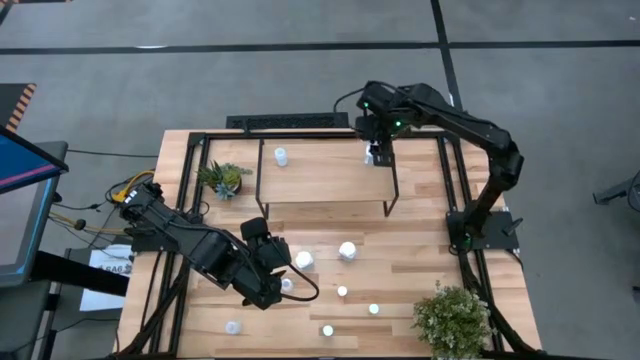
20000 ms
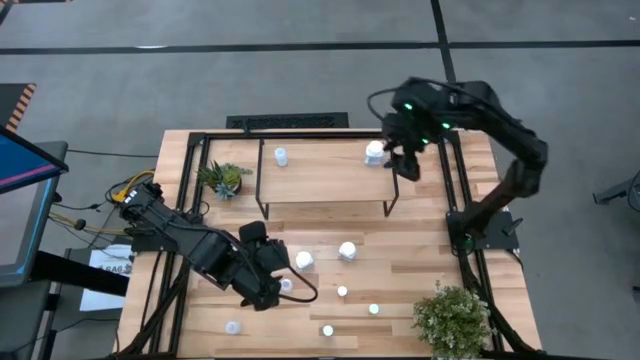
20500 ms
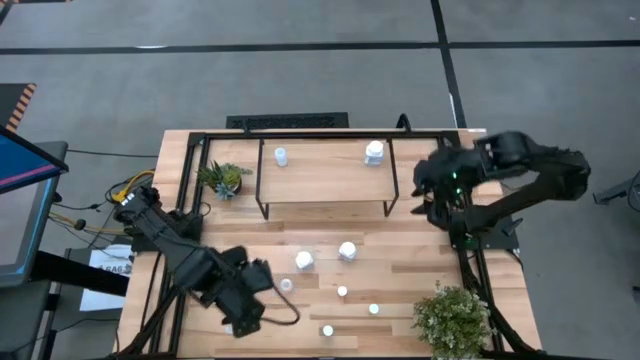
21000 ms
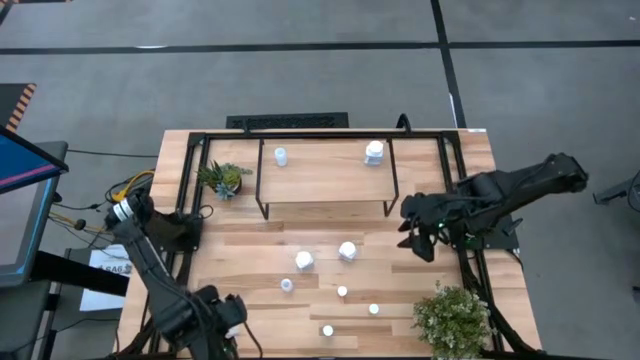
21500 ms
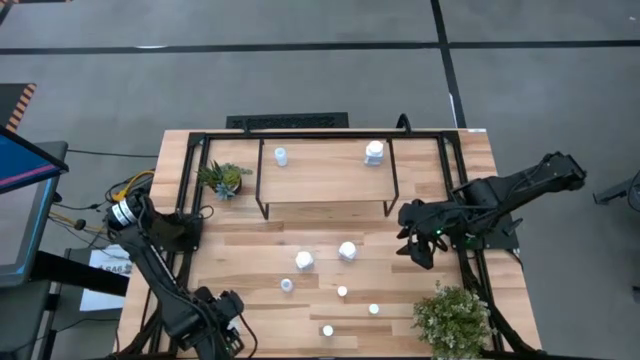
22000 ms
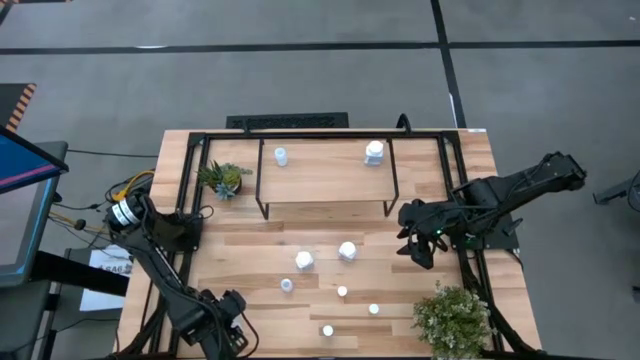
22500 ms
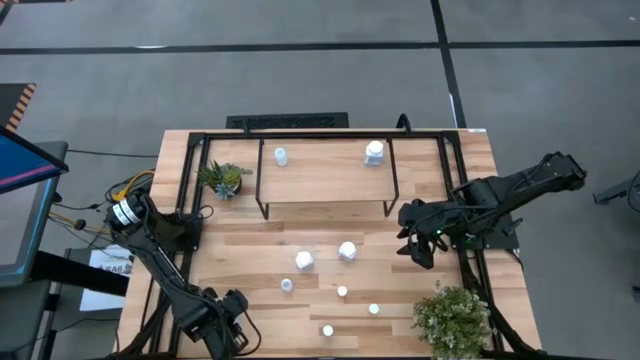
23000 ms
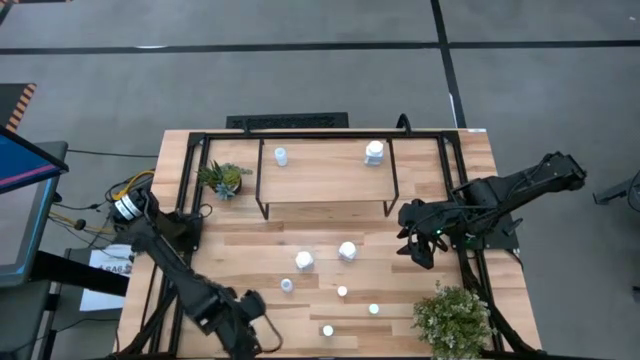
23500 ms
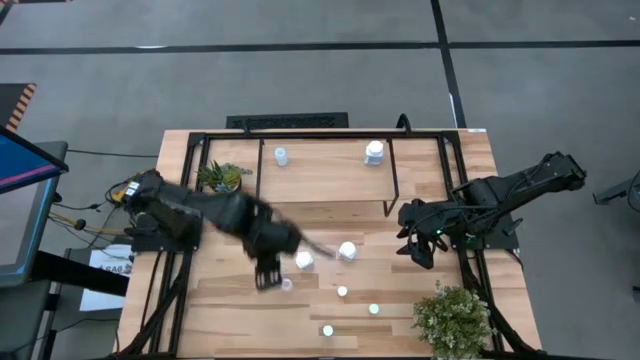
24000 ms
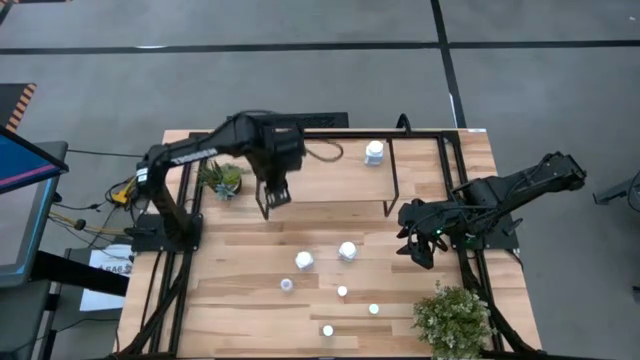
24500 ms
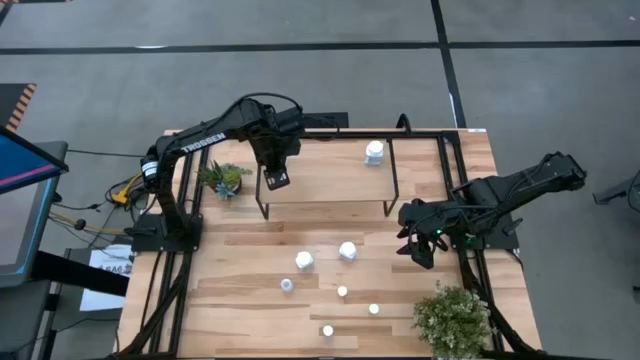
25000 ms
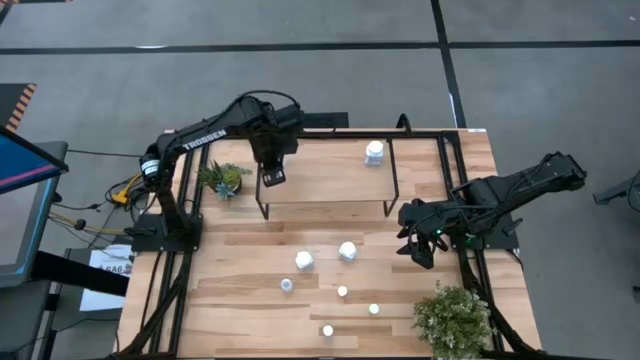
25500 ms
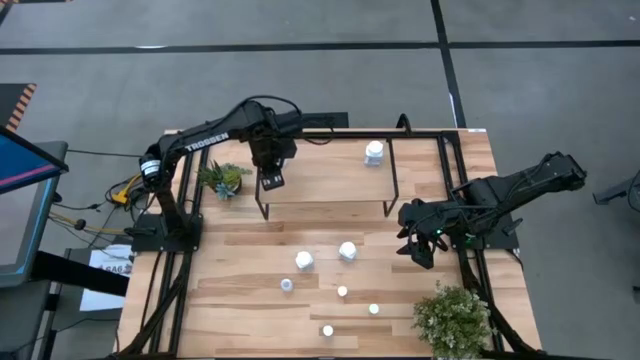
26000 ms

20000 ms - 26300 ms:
Task: Pick and place medicine bottles onto shelf by color
Put the left transparent pill bottle on the shelf aligned with the other transparent pill bottle

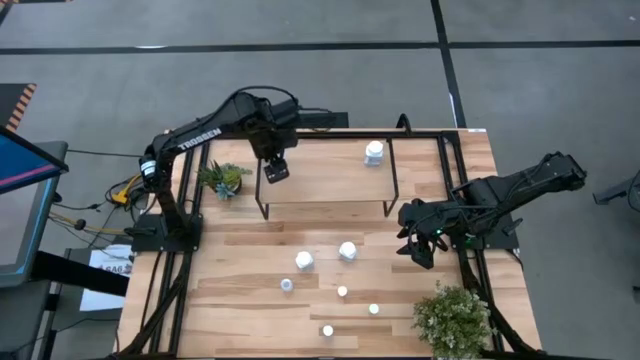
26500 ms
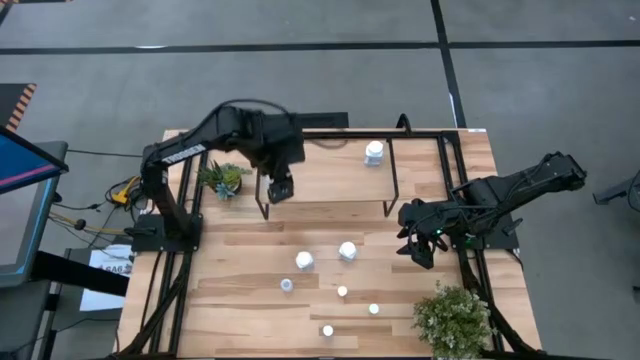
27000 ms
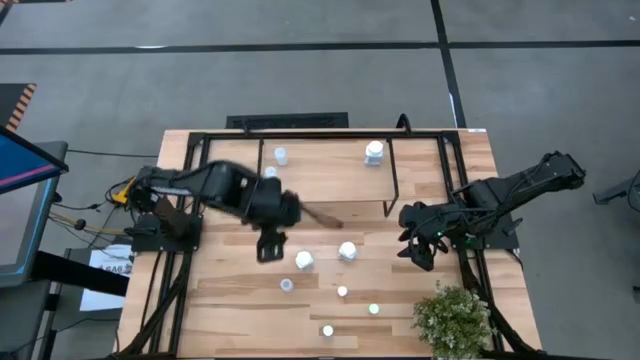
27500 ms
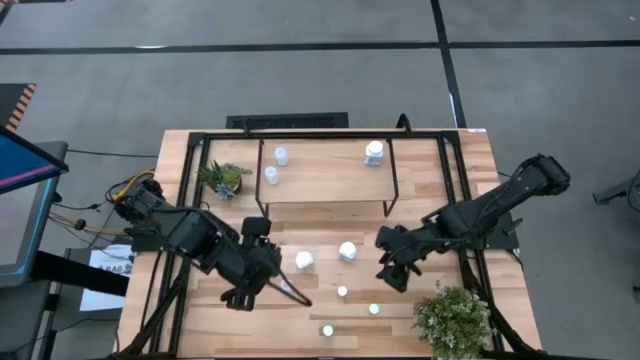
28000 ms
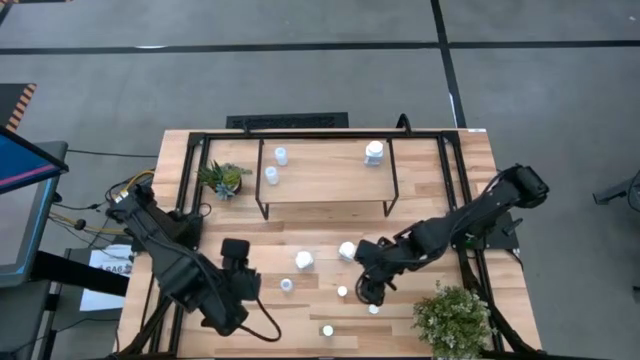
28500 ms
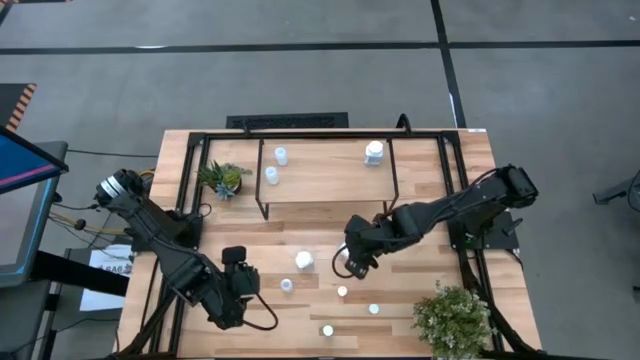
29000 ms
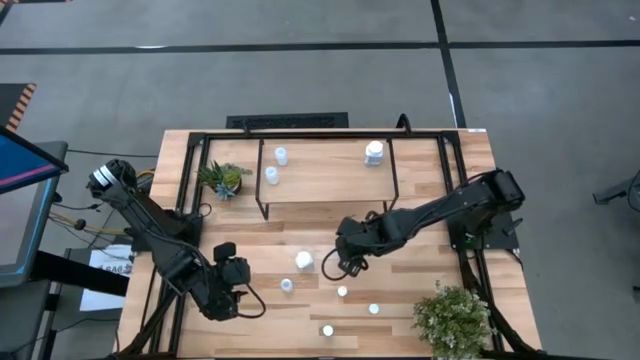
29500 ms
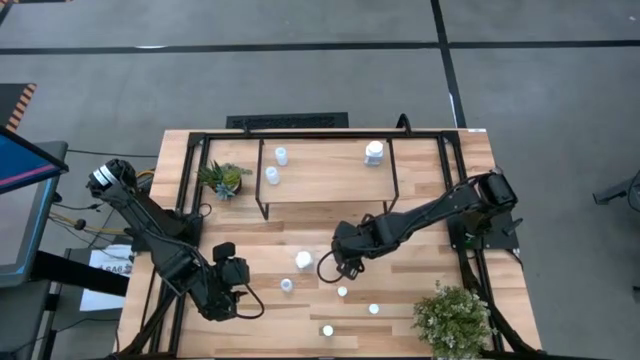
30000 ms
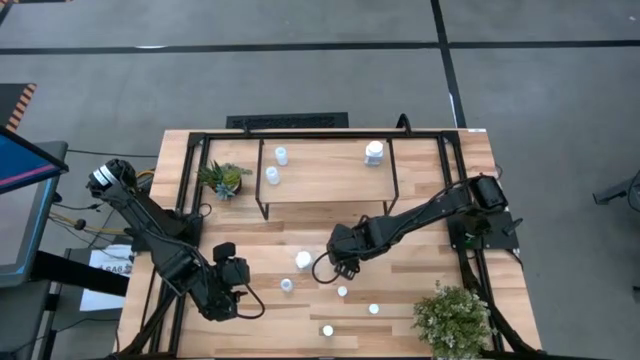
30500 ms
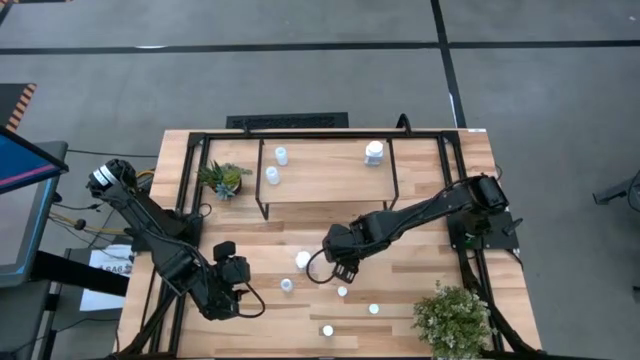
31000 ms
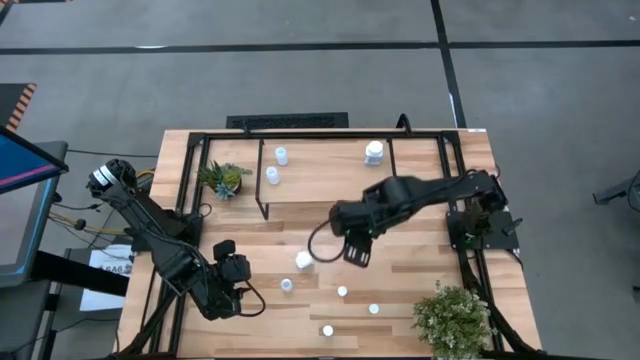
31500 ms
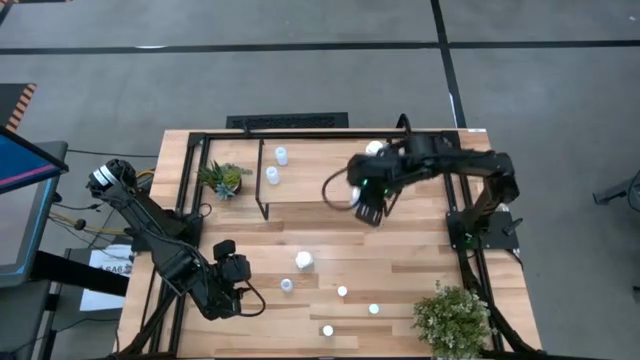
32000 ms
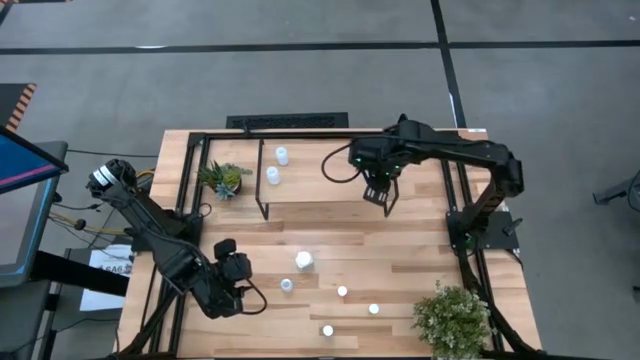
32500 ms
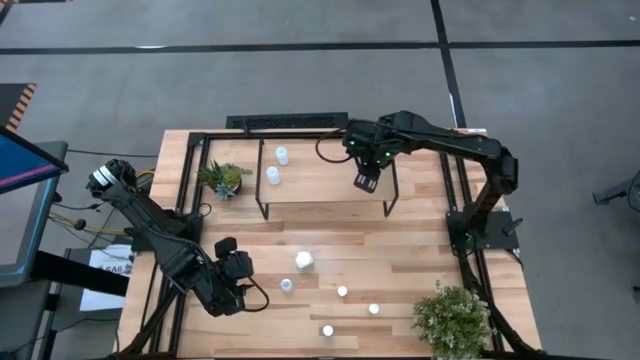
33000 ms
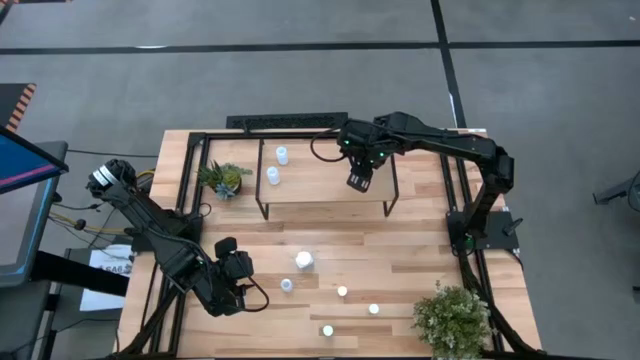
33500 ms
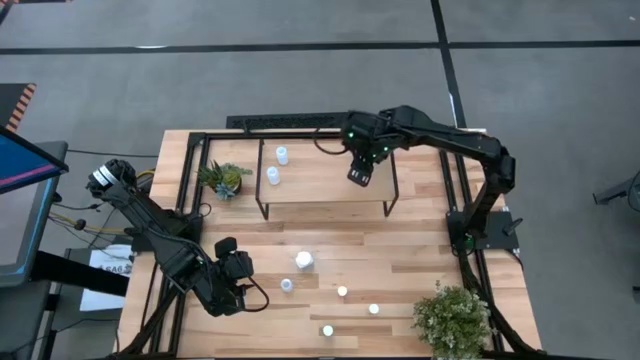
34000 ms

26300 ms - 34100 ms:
Put the right white and blue pill bottle on the shelf

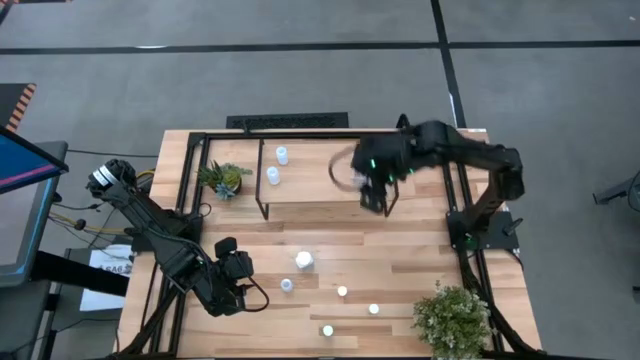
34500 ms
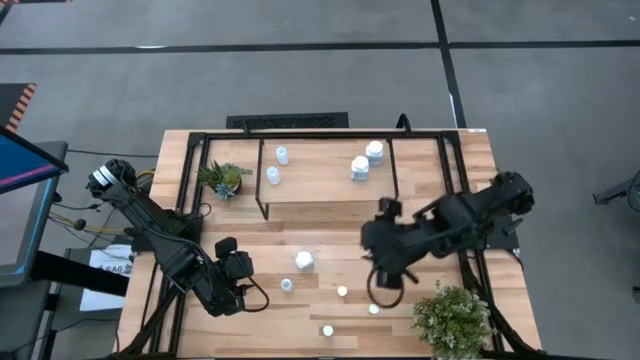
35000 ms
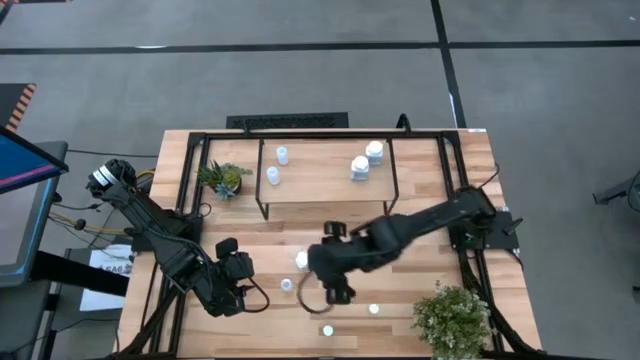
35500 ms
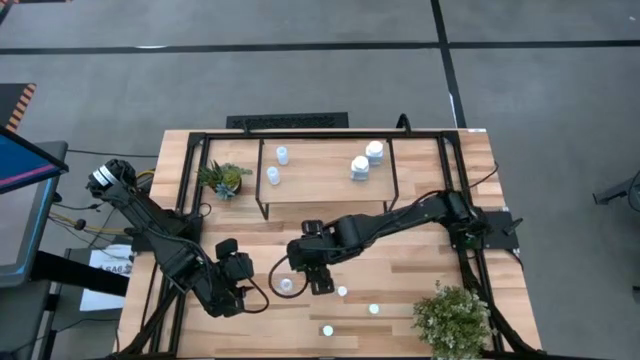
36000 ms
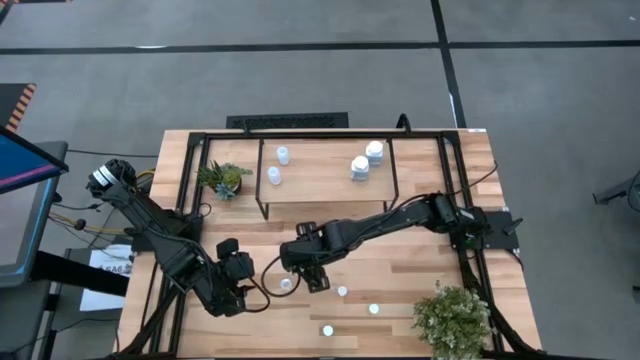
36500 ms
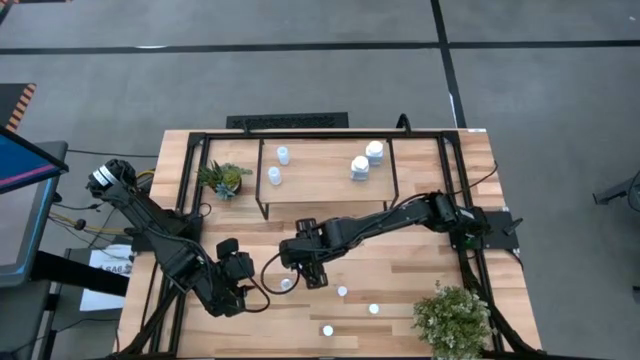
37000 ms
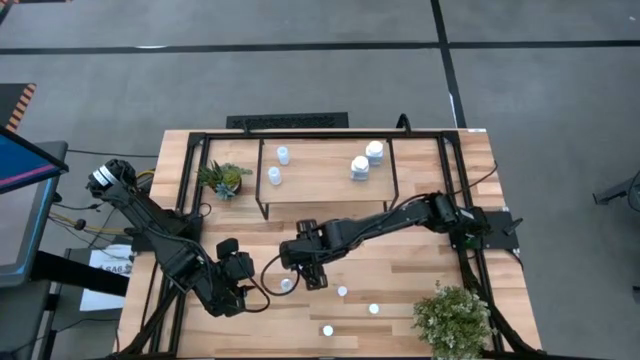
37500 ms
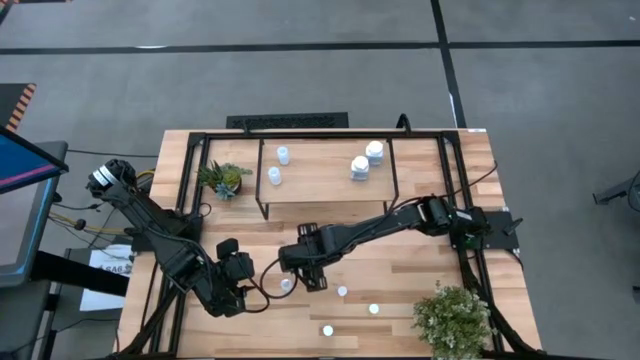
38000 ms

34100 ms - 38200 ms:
Put the white and blue pill bottle on the shelf

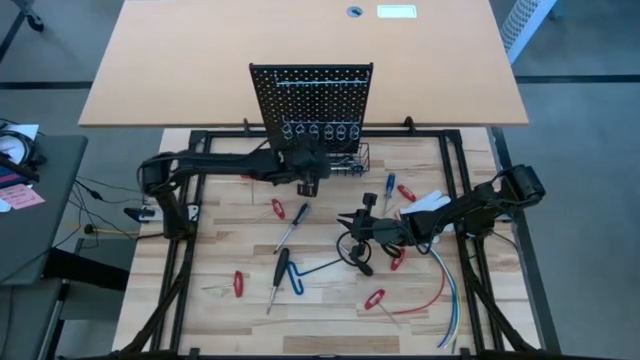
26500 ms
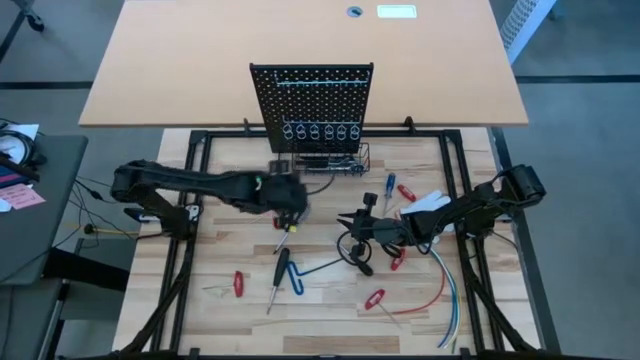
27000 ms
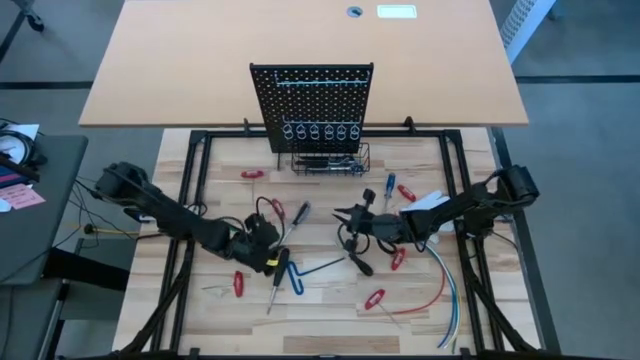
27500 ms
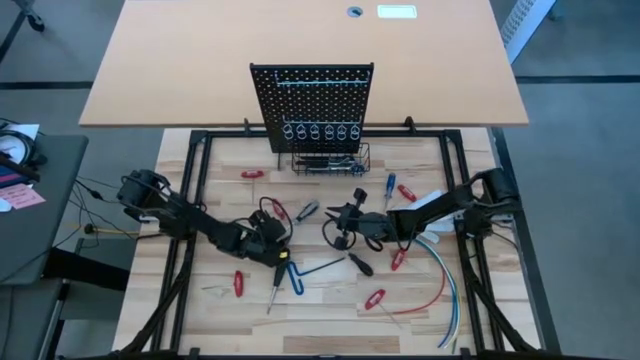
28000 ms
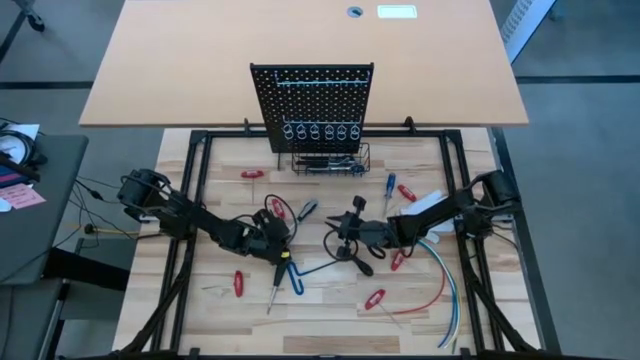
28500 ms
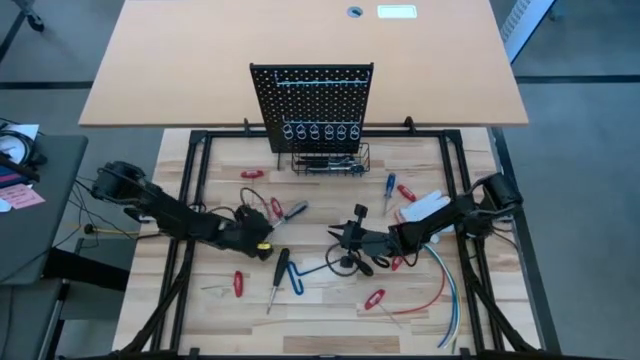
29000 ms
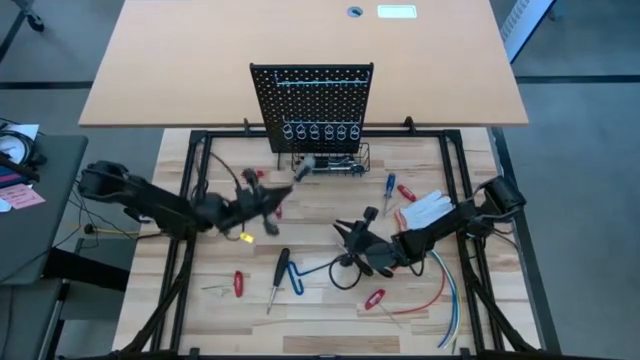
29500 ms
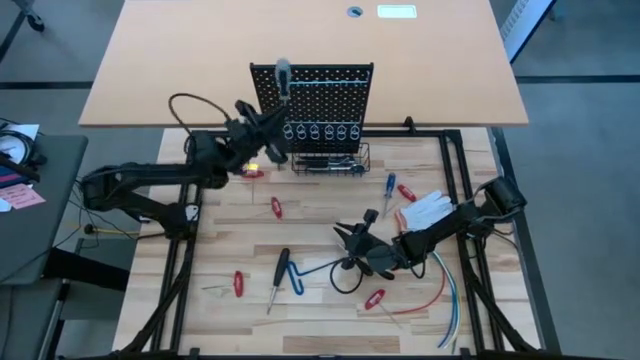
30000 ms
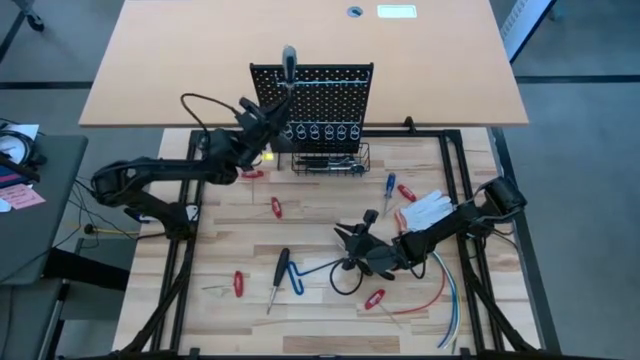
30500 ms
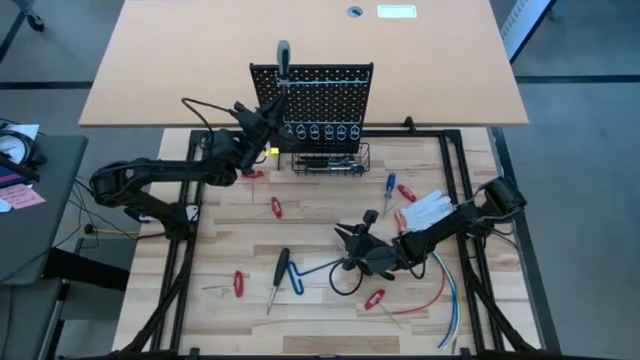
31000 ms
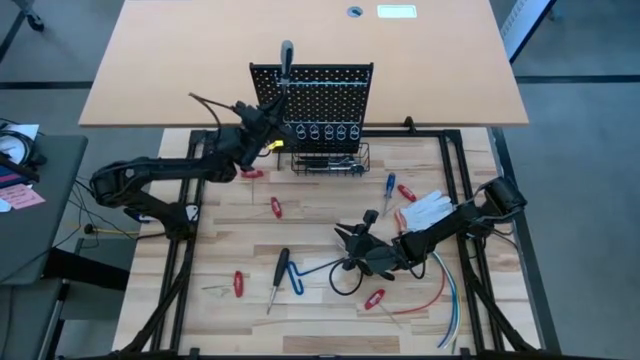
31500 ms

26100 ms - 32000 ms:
Task: Hang tools onto peg board
Hang the gray screwdriver on the pegboard
